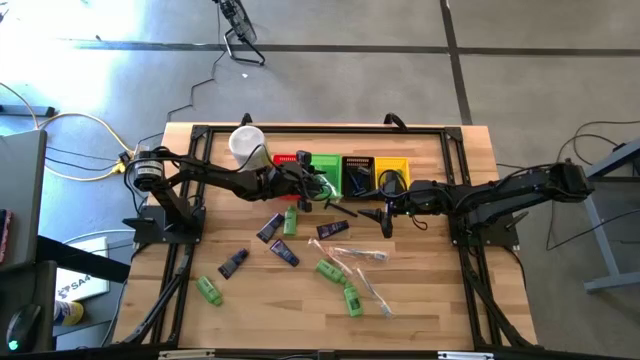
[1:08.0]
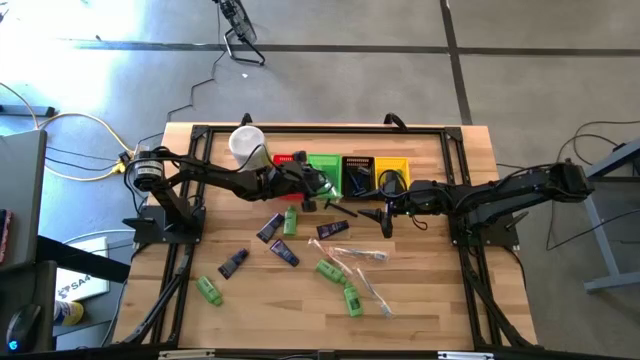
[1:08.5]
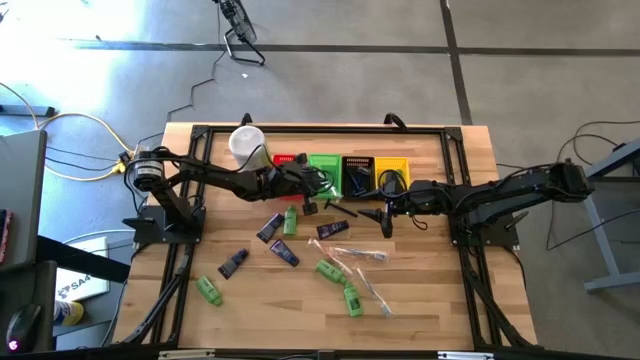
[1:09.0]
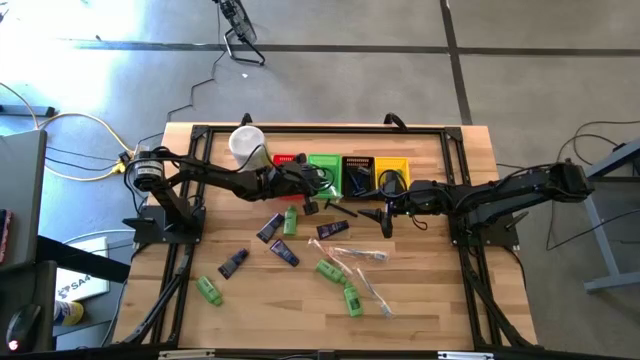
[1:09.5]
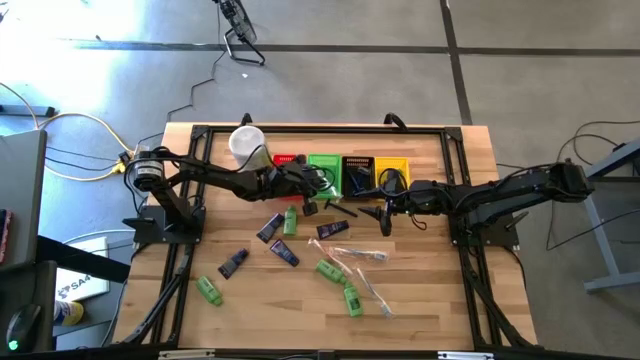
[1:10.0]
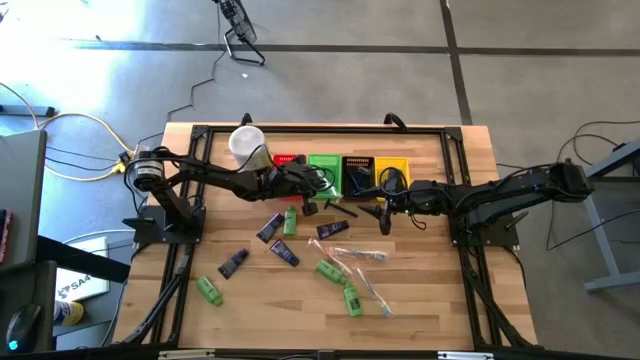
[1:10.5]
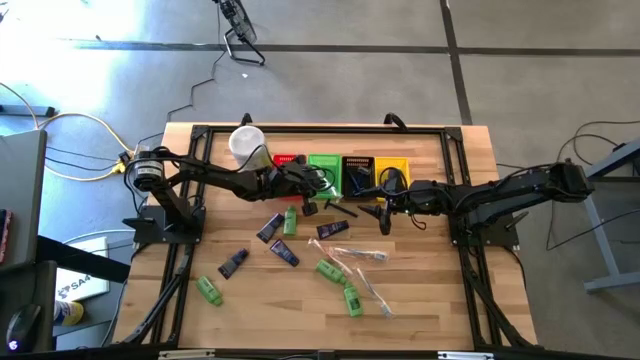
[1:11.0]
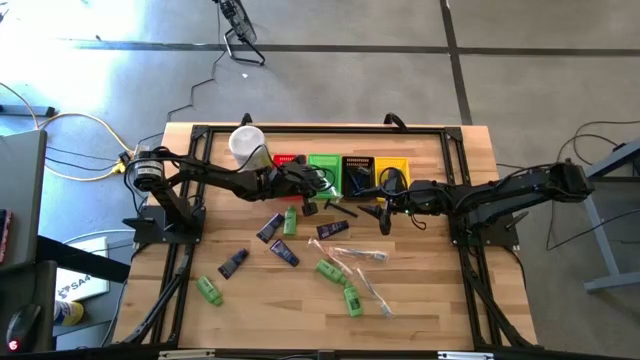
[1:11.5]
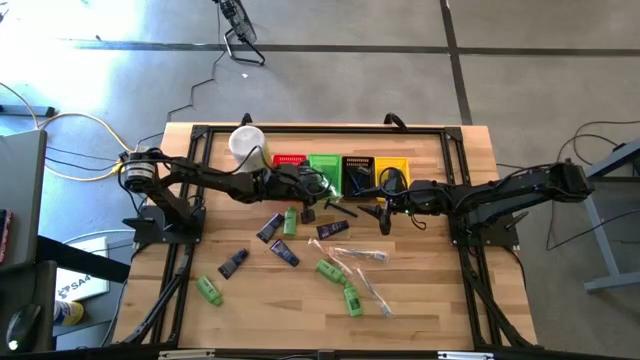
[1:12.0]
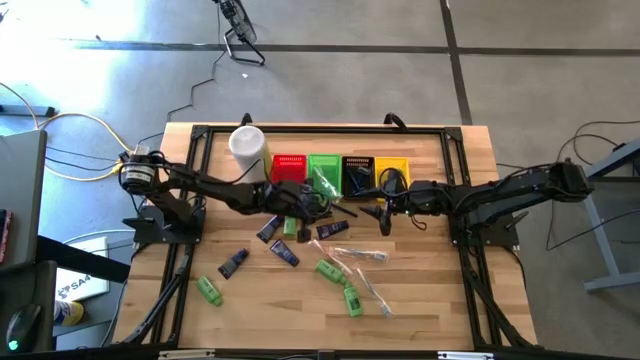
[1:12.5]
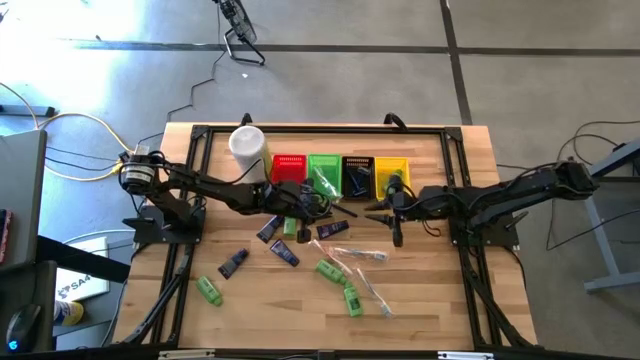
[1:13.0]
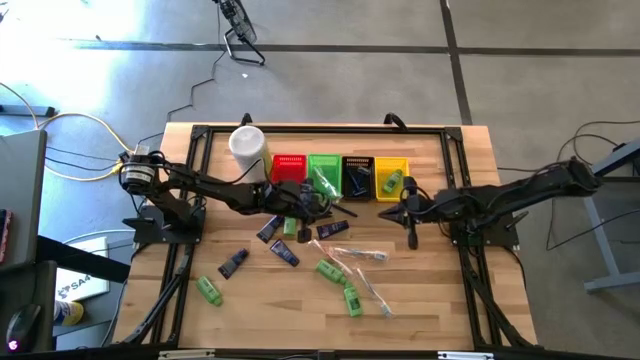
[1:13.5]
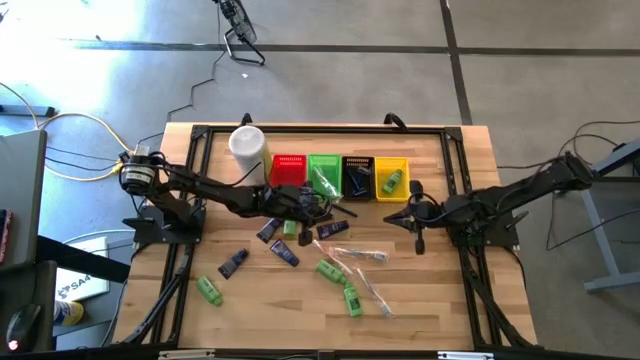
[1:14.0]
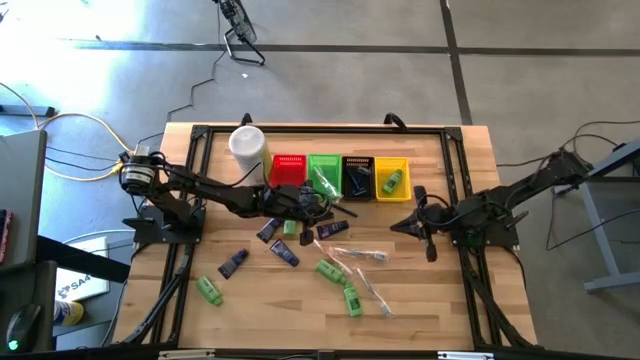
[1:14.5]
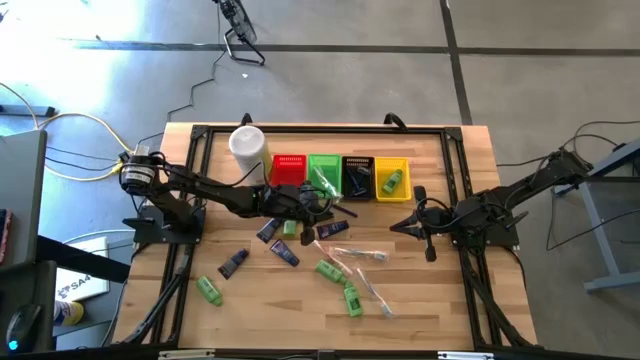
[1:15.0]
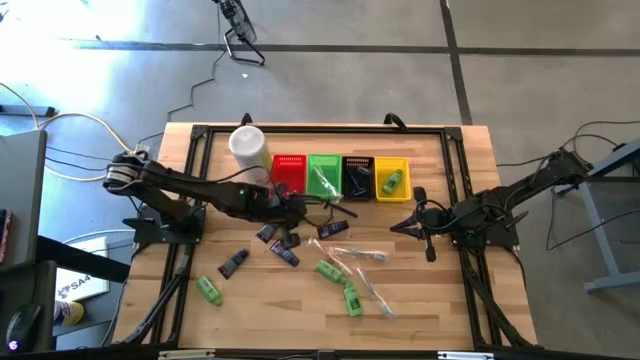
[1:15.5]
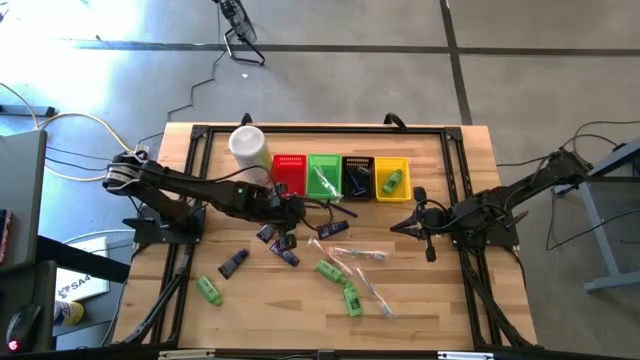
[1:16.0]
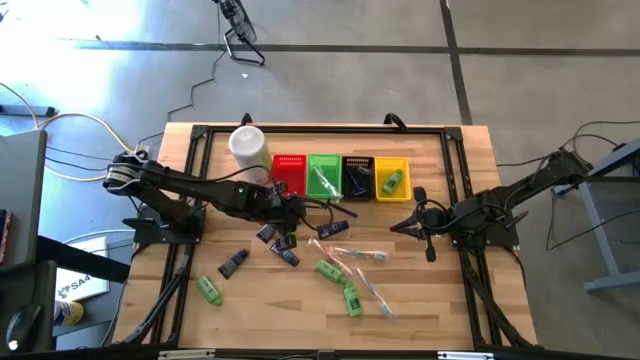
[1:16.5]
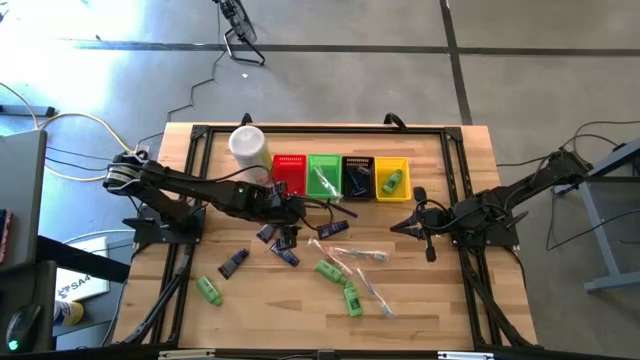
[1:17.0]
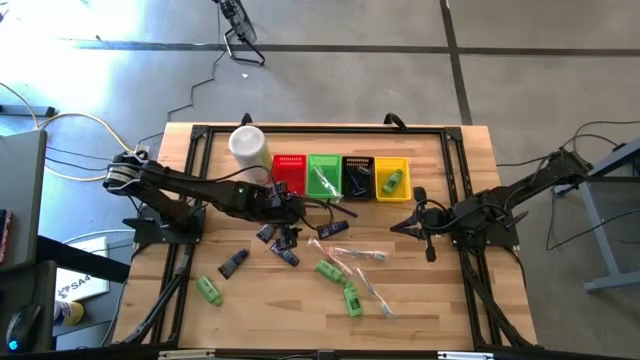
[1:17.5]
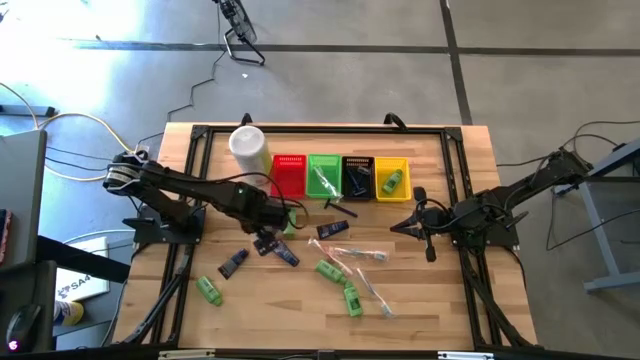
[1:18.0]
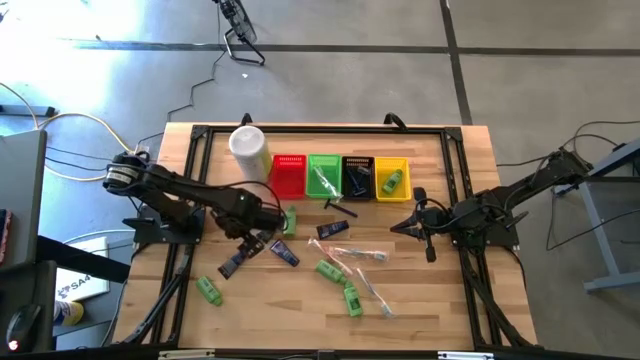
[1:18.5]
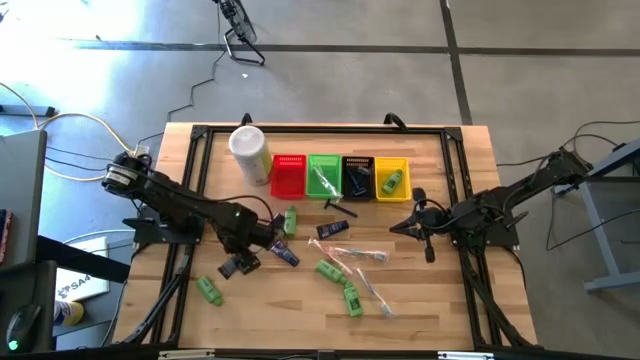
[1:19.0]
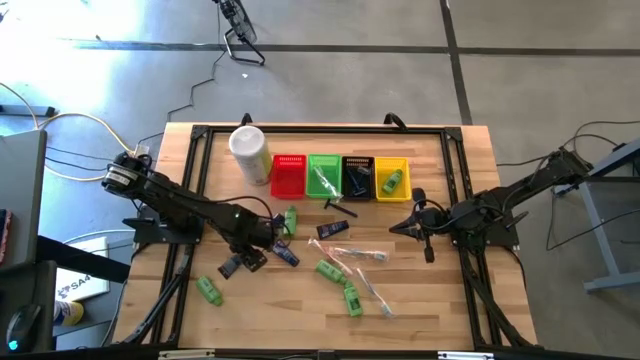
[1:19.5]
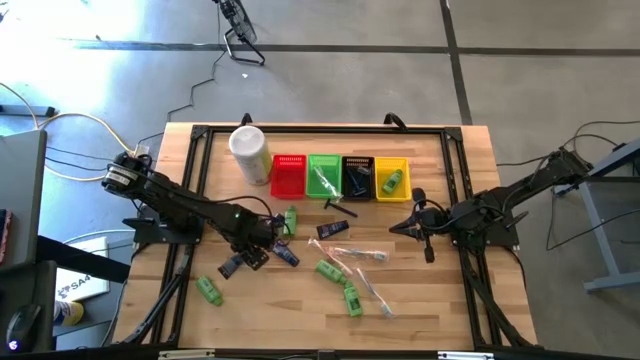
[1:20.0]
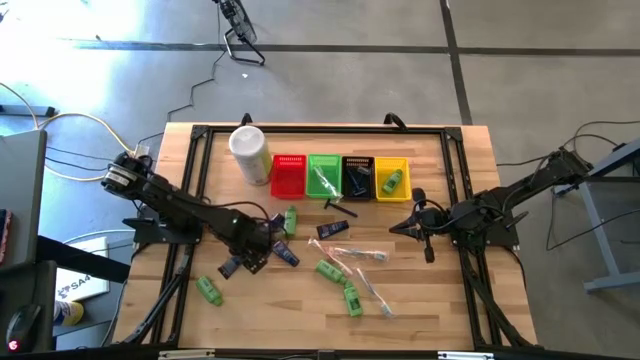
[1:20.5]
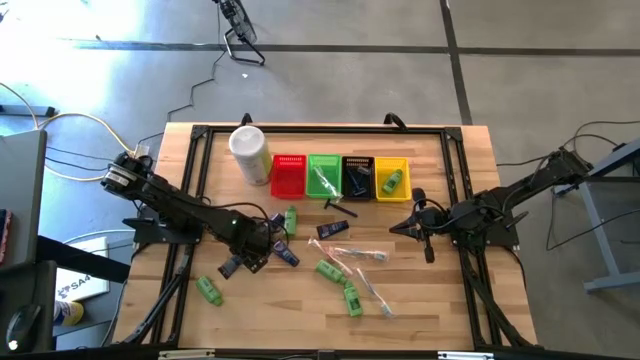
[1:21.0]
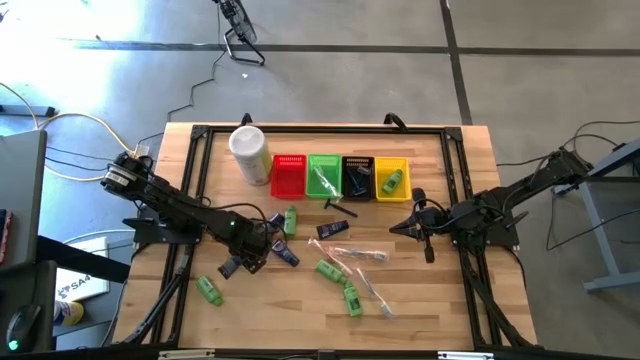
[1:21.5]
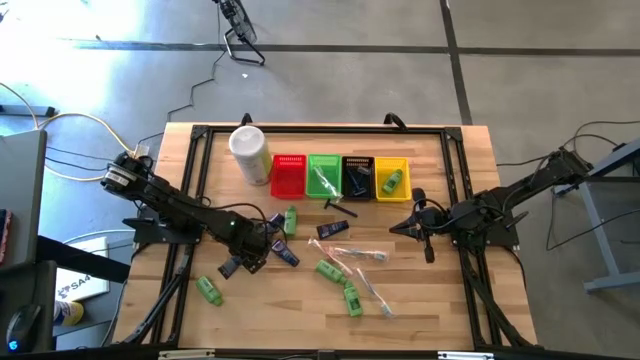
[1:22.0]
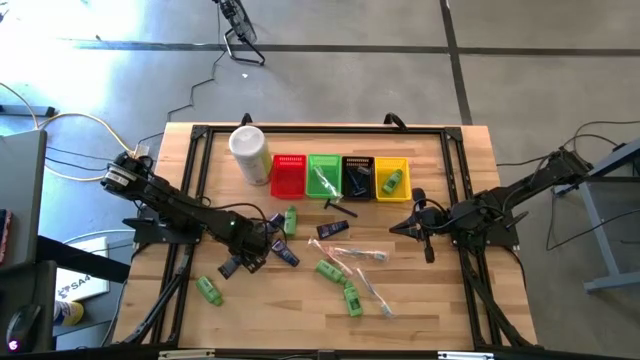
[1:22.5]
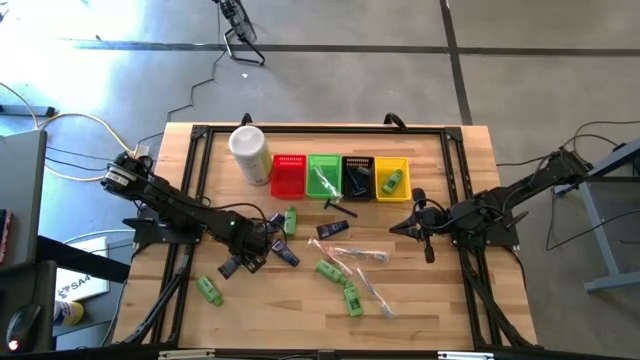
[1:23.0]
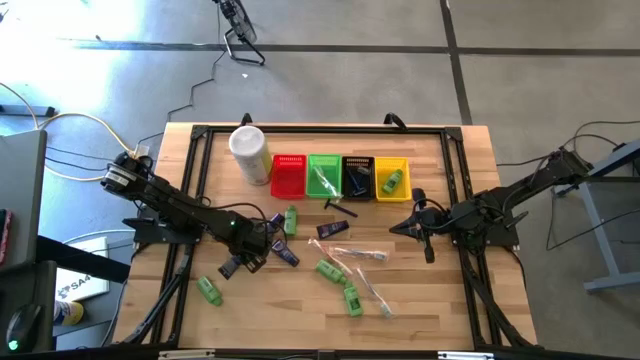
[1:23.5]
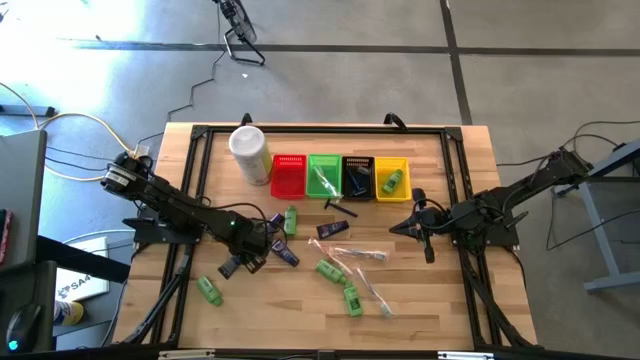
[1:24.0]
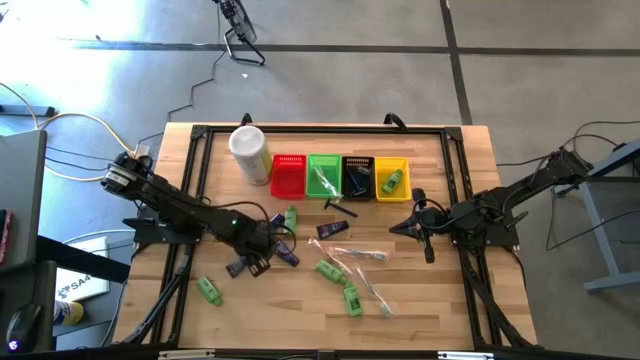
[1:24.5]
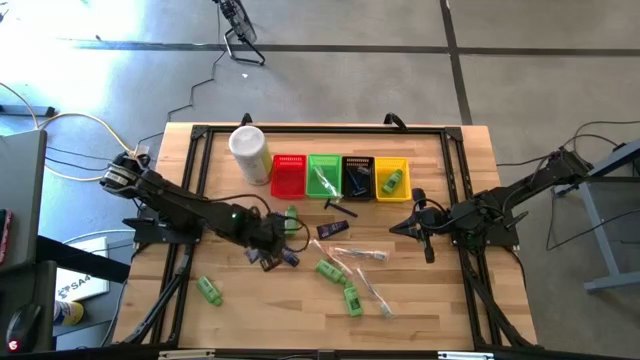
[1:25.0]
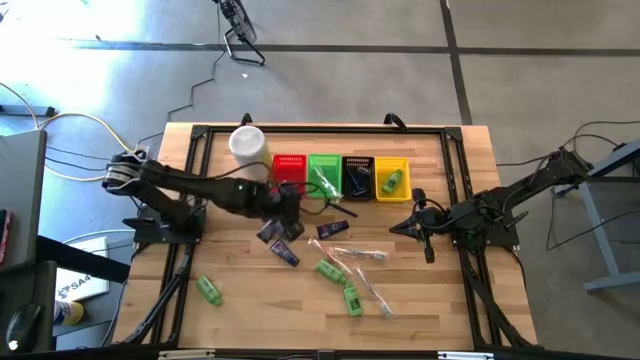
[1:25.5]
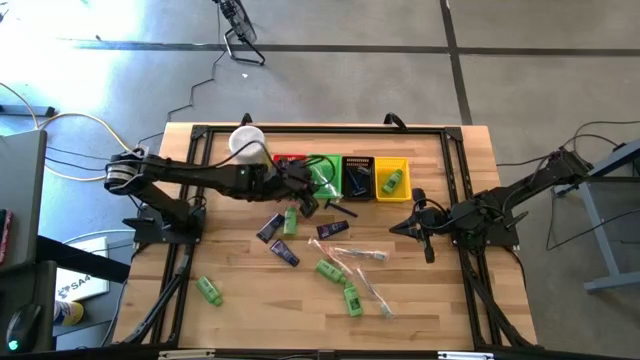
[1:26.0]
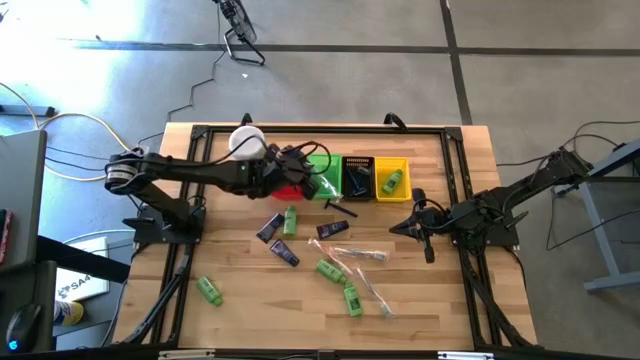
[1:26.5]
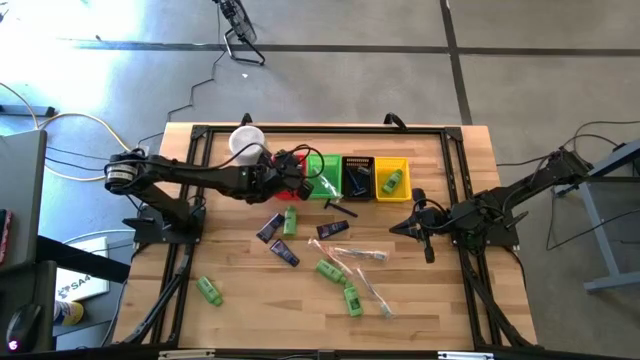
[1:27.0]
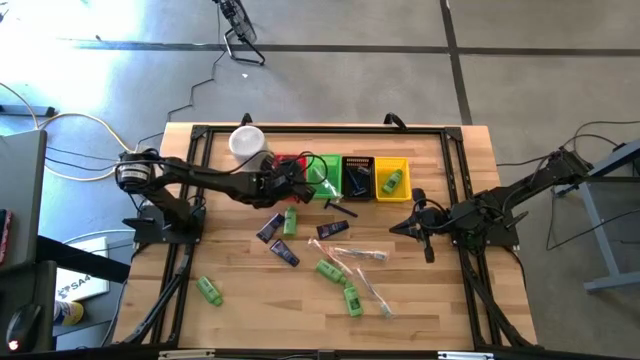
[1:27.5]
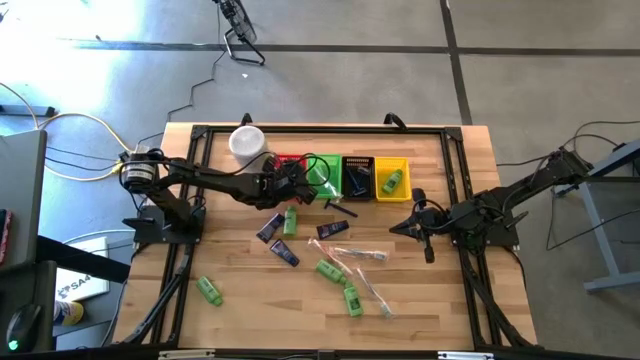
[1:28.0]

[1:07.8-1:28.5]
Task: Pick & Place Travel size toiletries
Put the blue shave cream into the red bin

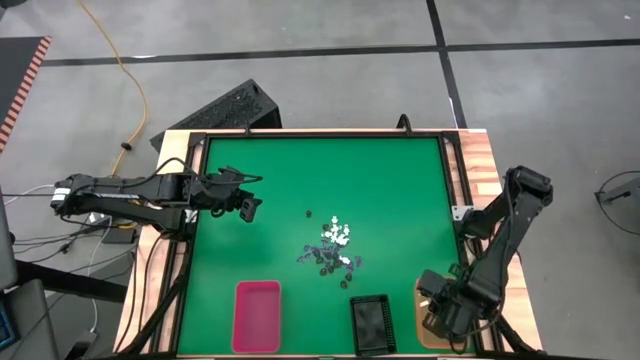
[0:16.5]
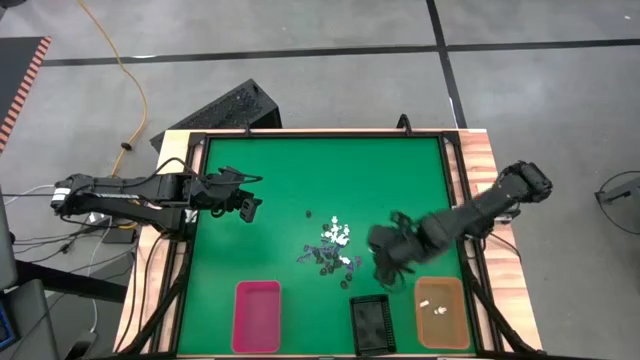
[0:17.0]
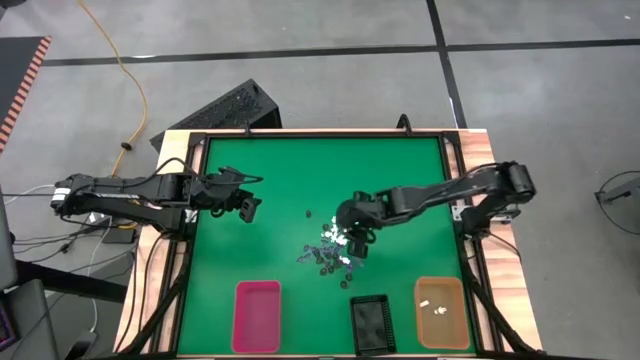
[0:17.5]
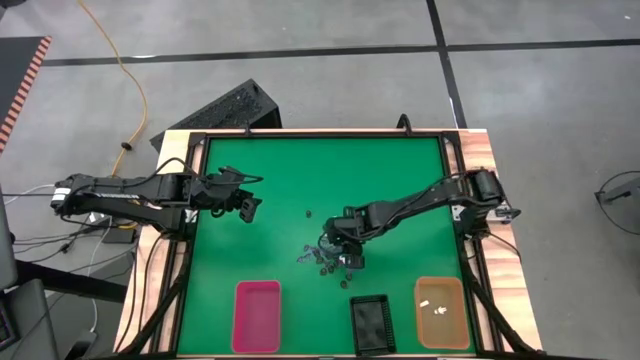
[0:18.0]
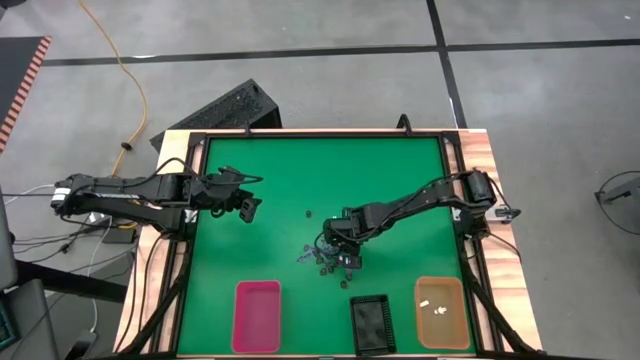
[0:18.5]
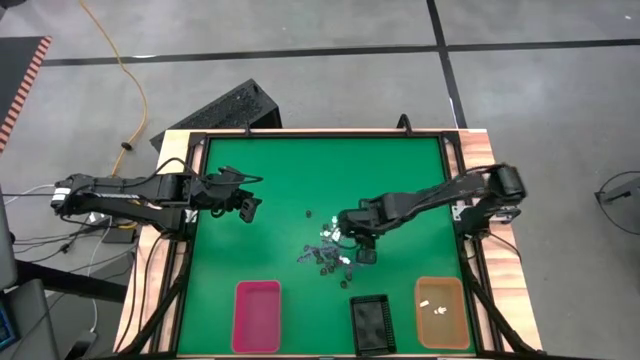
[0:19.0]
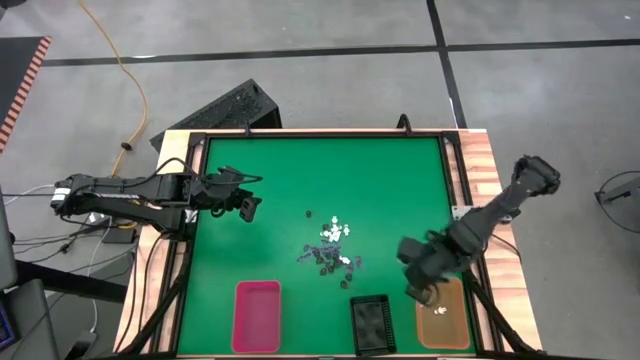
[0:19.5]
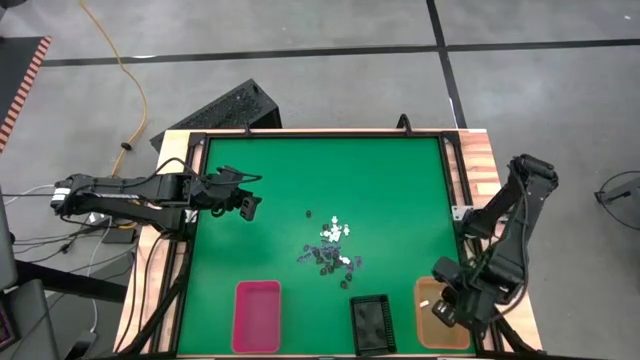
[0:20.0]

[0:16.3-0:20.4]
Task: Sort Halloween decoration
Put the white skeleton toy into the right orange organizing bin
